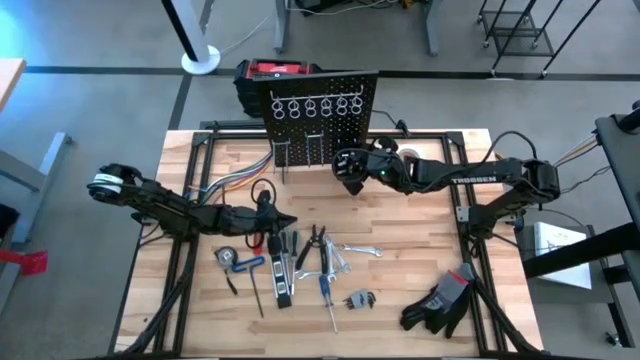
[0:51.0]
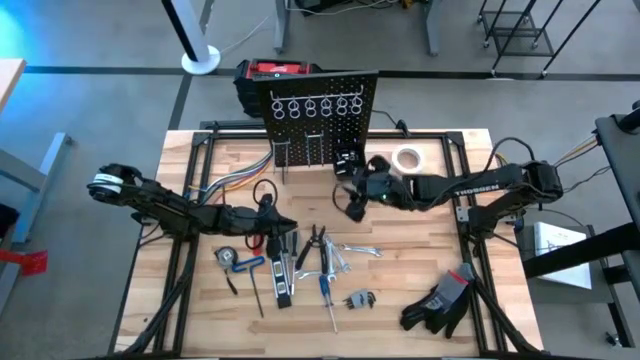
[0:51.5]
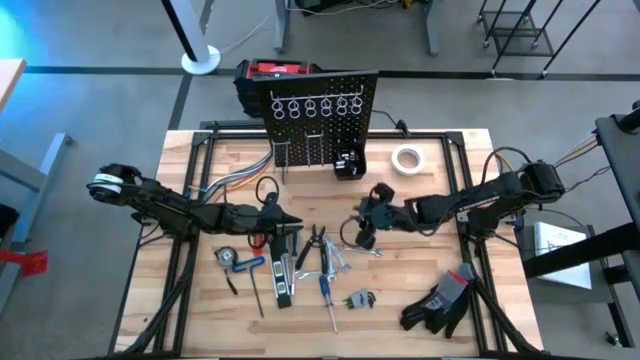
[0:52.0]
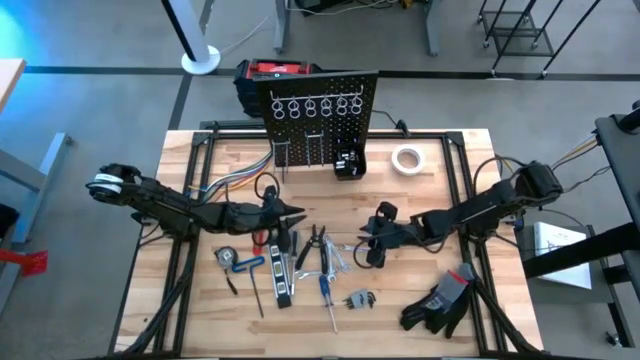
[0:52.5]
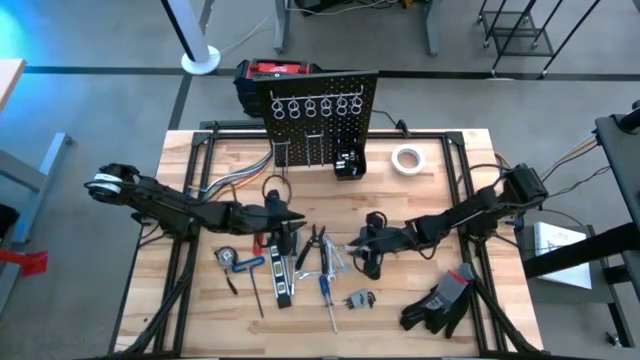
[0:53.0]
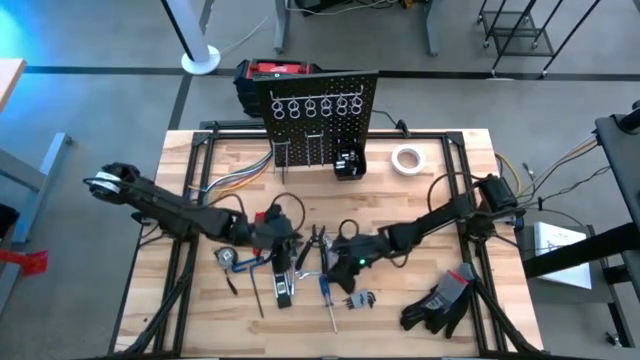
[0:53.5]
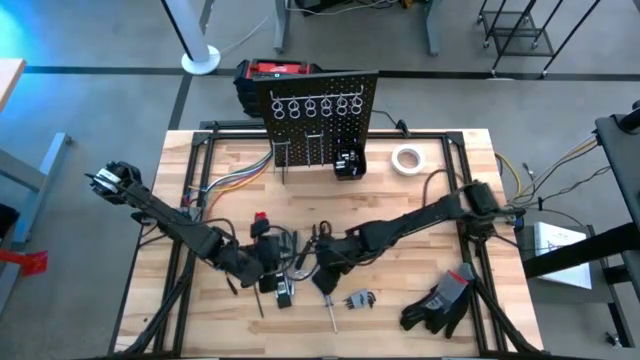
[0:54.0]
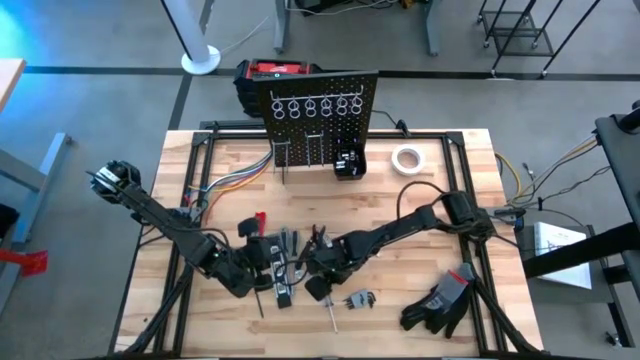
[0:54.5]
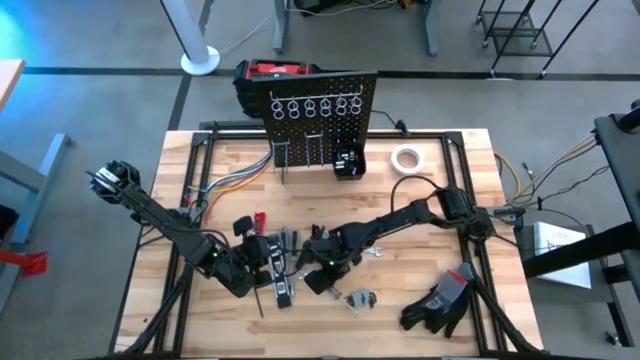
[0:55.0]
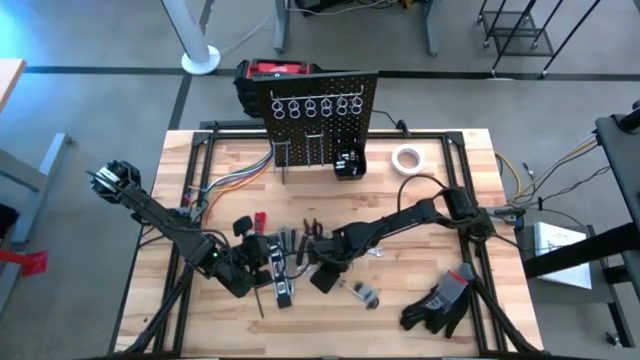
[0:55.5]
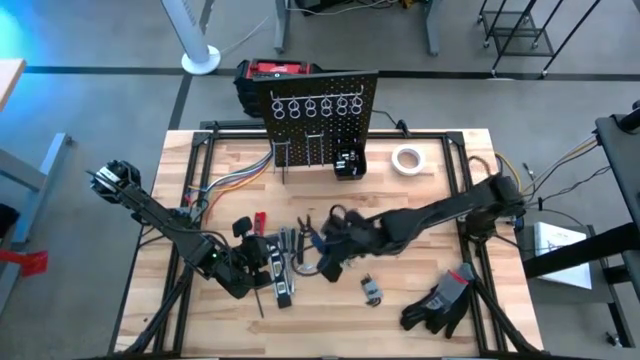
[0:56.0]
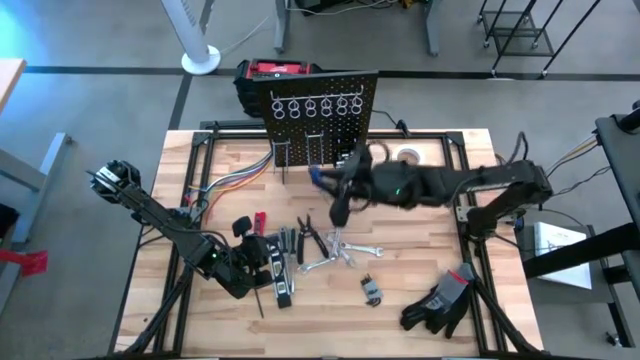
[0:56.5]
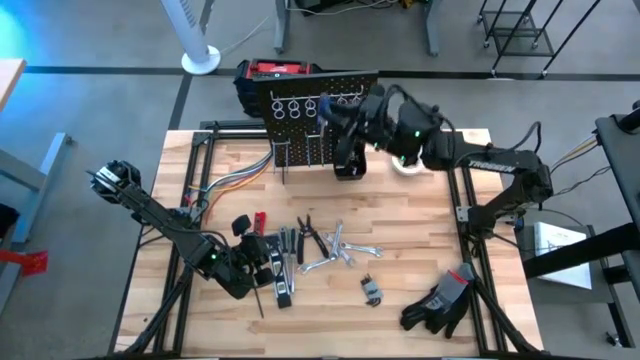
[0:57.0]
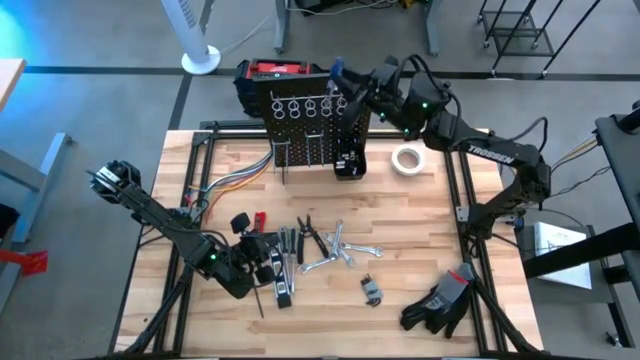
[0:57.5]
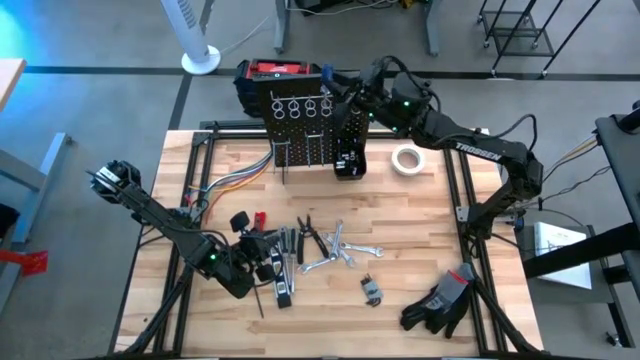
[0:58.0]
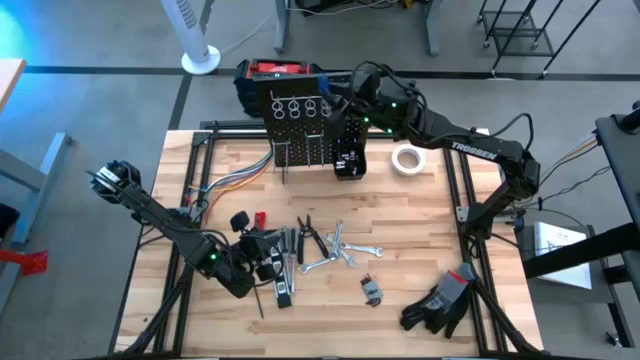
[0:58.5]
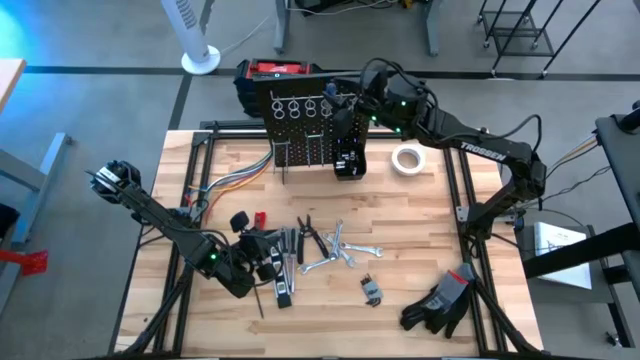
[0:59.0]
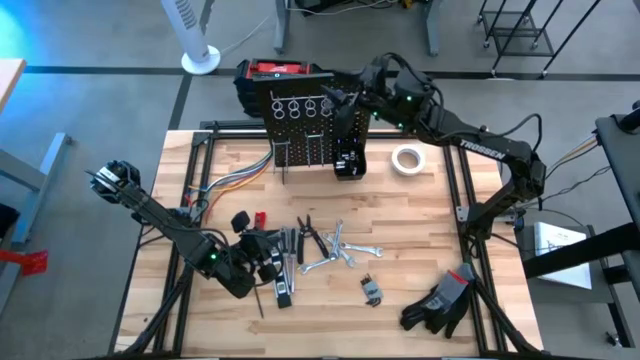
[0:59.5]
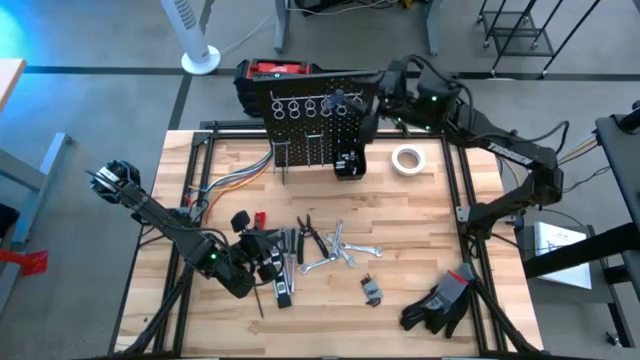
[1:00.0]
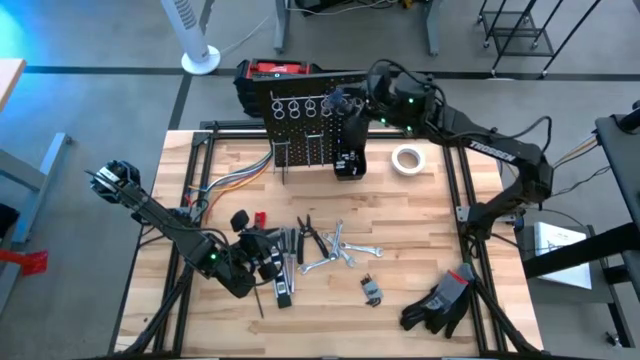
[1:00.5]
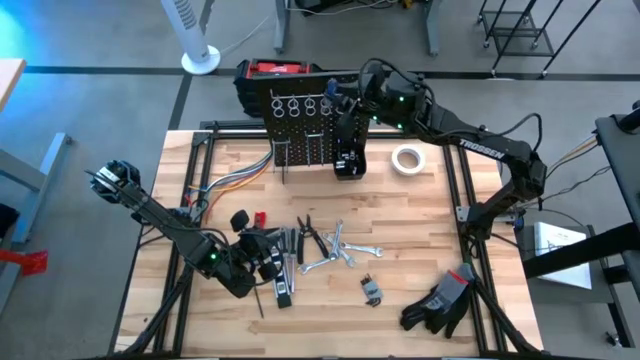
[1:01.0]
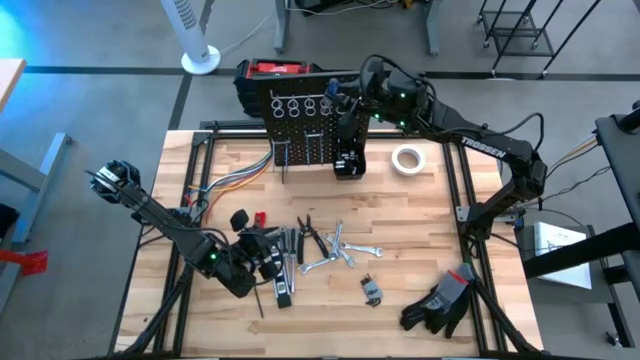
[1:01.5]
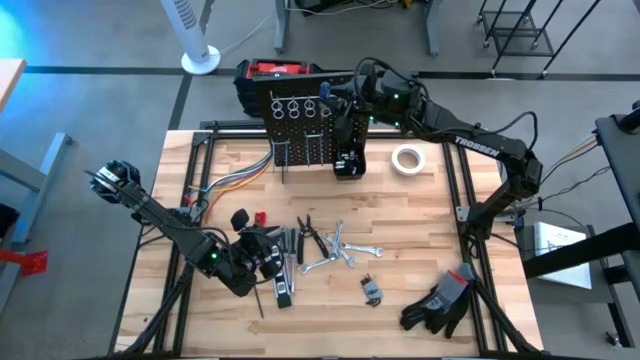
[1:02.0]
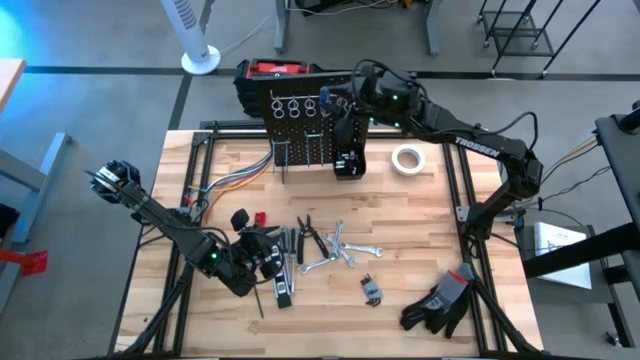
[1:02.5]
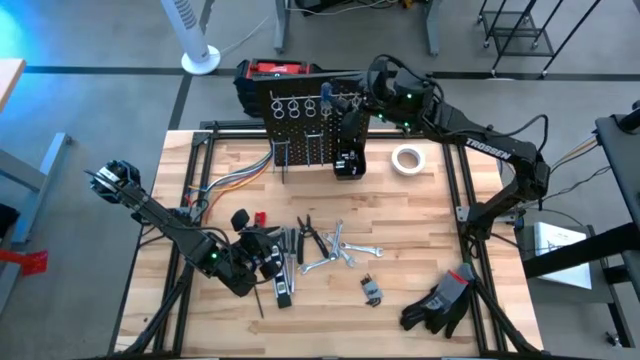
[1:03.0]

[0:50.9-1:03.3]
Task: Hang tools onto peg board
Hang the blue screwdriver on the peg board

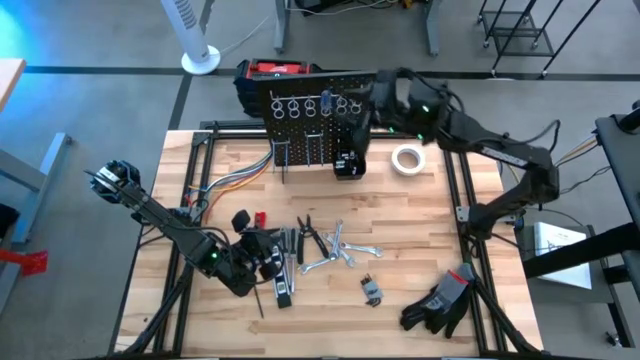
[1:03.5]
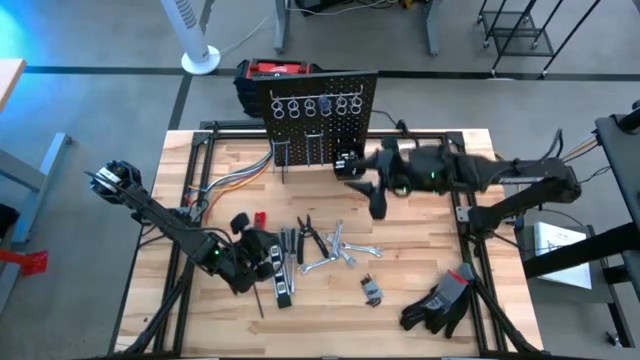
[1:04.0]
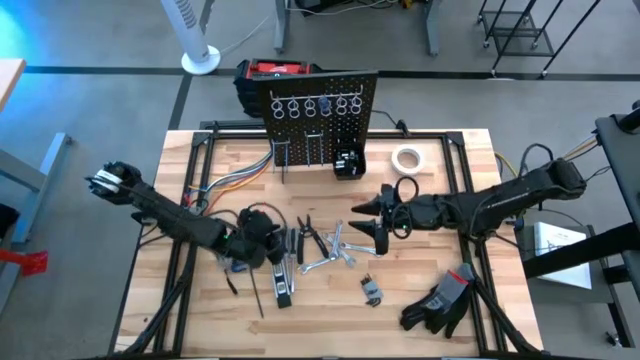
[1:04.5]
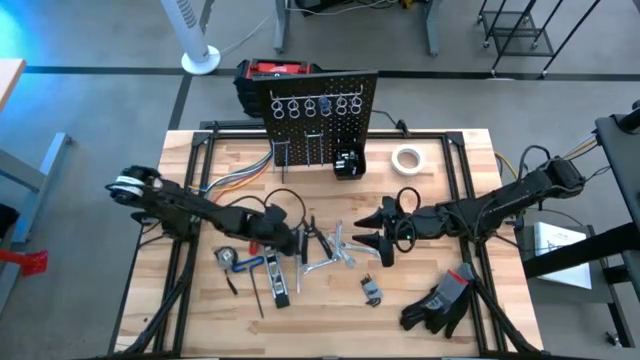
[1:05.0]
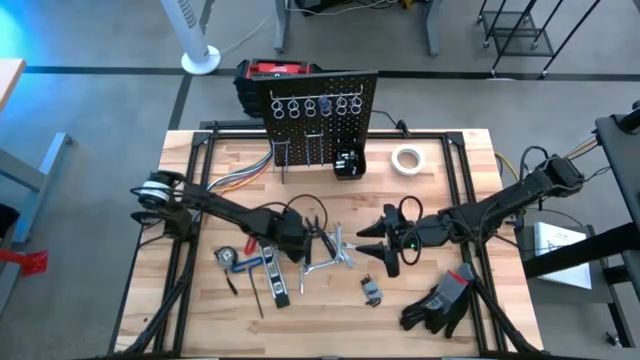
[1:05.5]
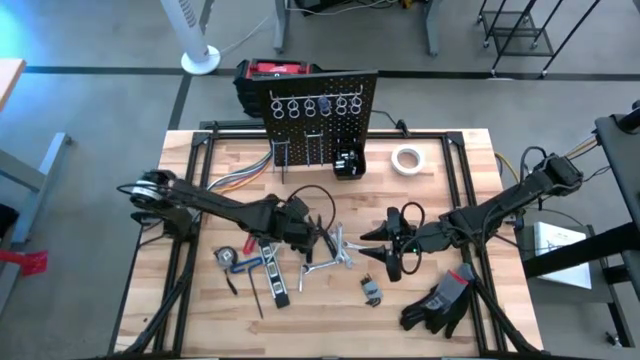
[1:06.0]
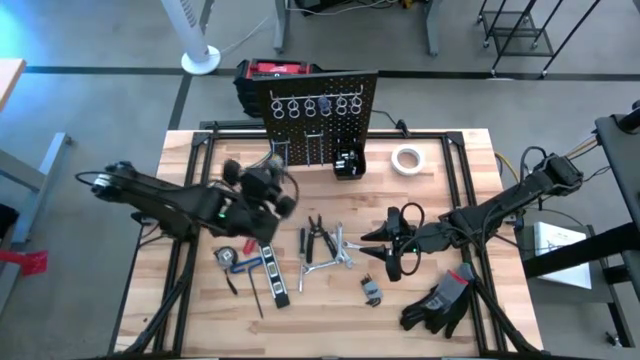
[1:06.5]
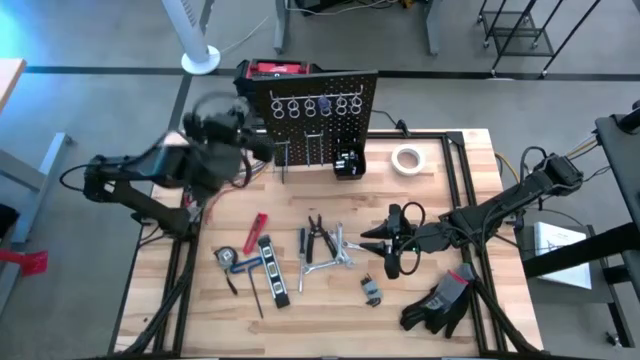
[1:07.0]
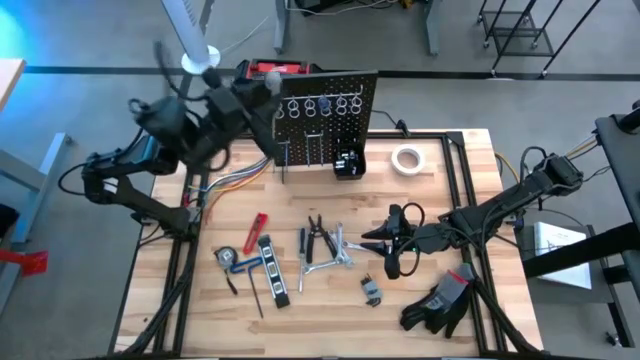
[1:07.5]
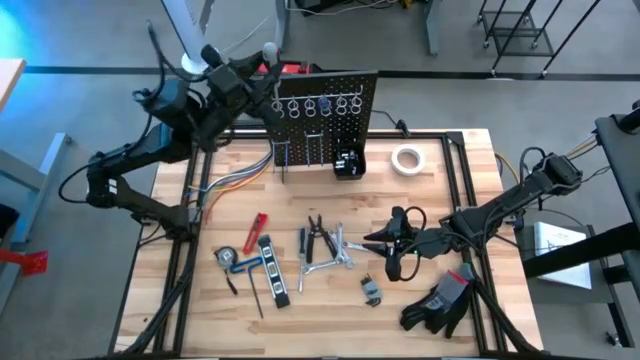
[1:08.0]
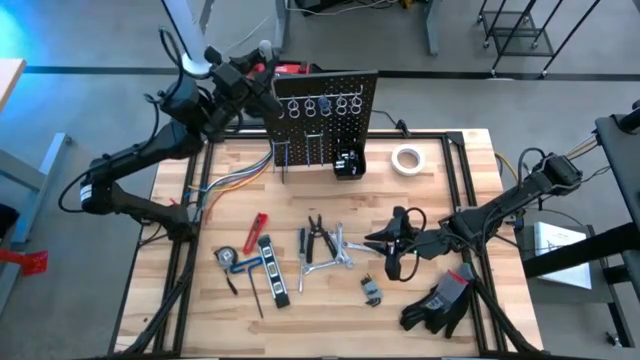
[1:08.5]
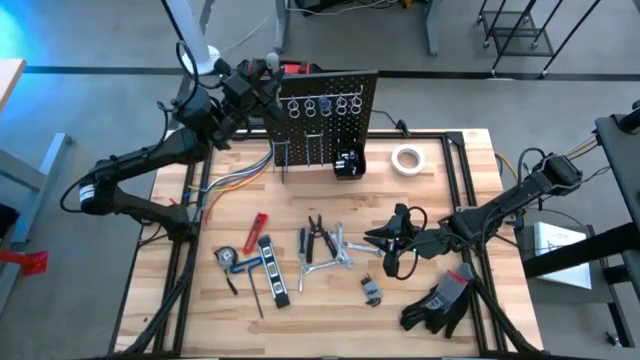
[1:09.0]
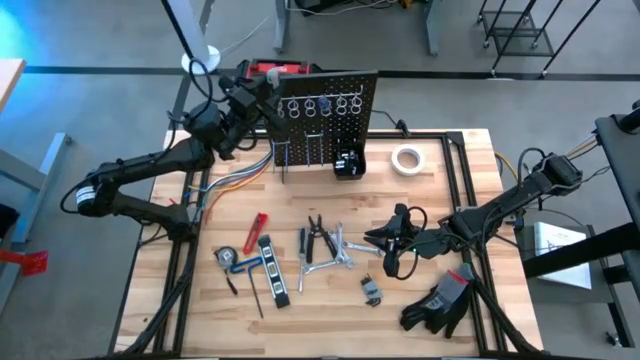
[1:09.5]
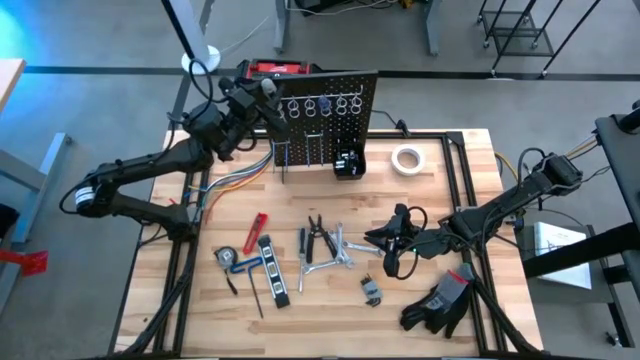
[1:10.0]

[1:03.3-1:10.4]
Hang the gray screwdriver on the peg board
